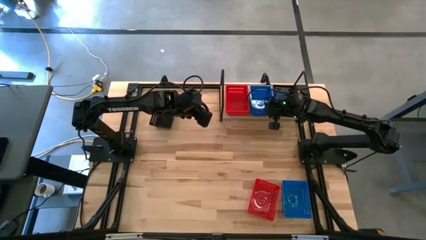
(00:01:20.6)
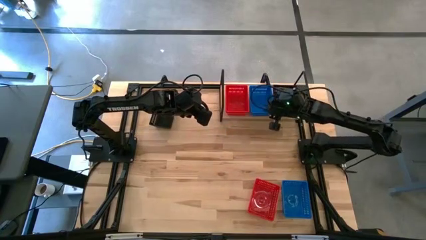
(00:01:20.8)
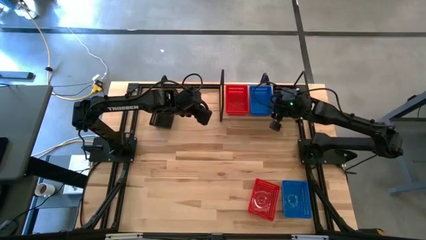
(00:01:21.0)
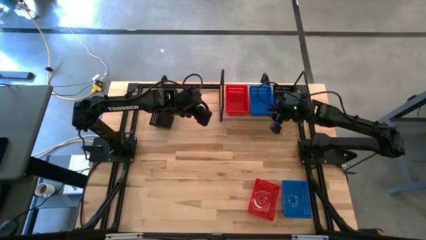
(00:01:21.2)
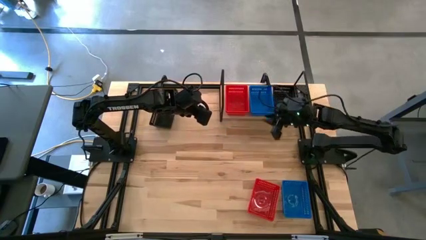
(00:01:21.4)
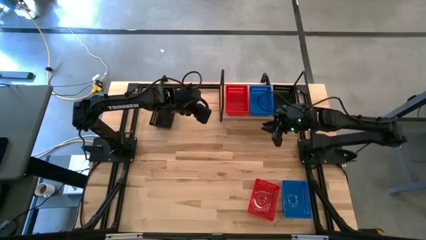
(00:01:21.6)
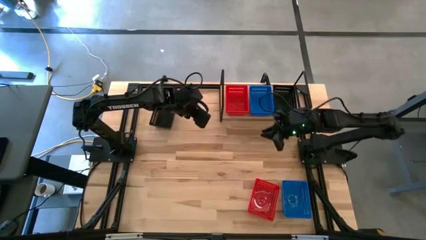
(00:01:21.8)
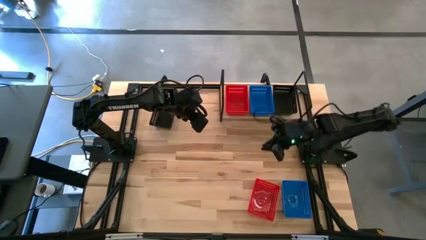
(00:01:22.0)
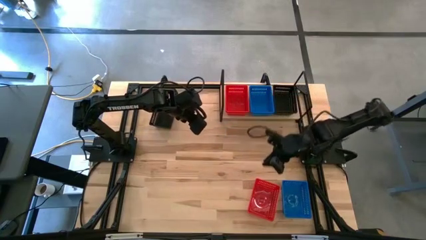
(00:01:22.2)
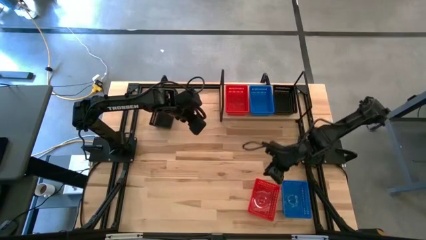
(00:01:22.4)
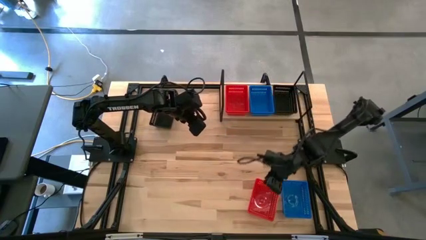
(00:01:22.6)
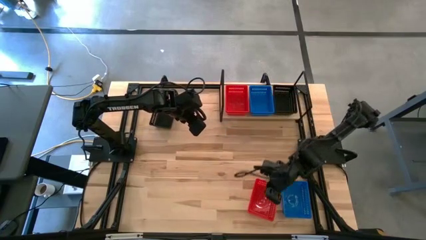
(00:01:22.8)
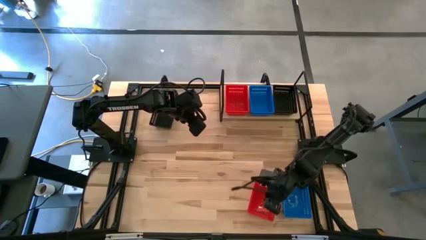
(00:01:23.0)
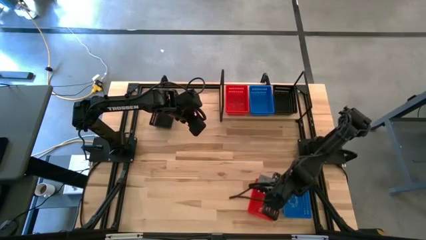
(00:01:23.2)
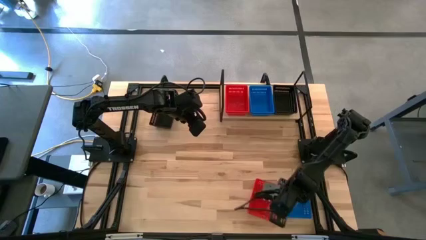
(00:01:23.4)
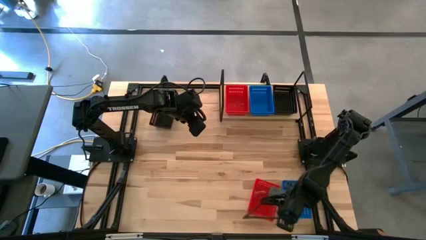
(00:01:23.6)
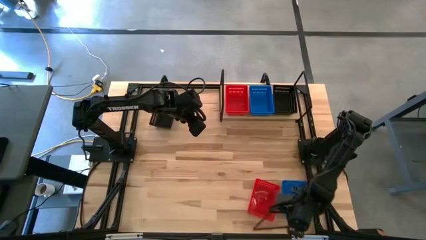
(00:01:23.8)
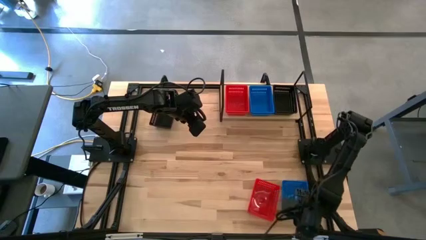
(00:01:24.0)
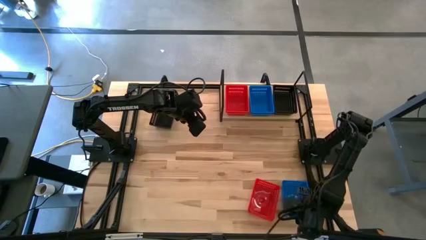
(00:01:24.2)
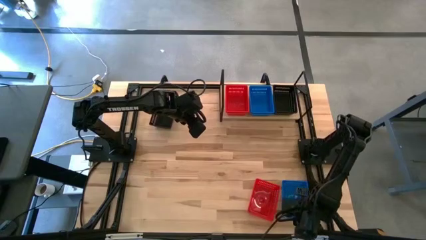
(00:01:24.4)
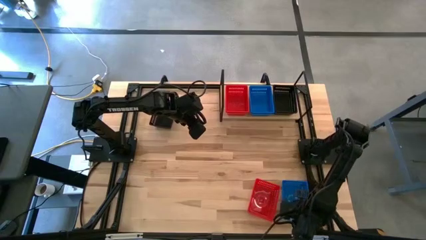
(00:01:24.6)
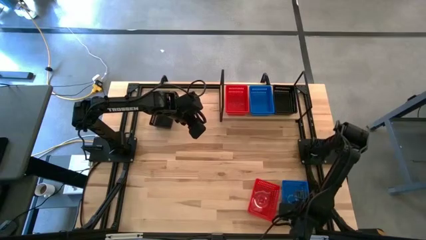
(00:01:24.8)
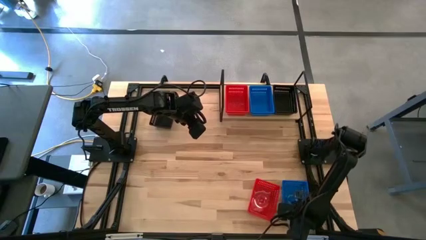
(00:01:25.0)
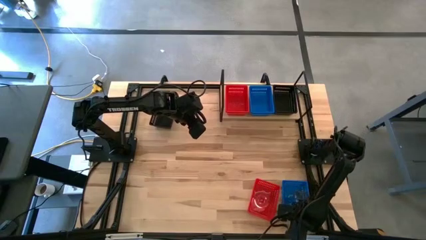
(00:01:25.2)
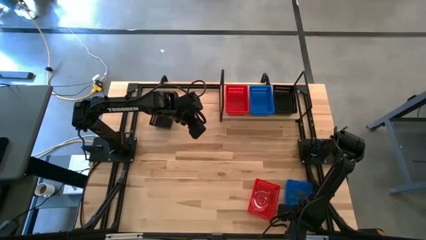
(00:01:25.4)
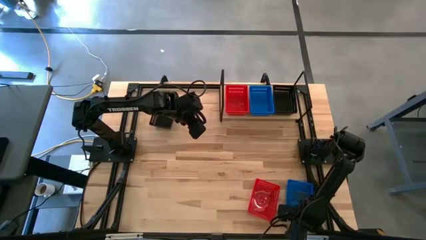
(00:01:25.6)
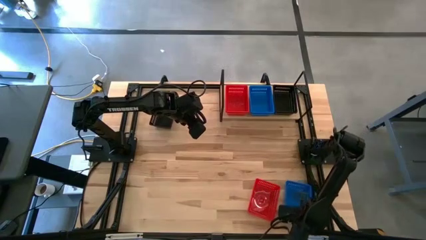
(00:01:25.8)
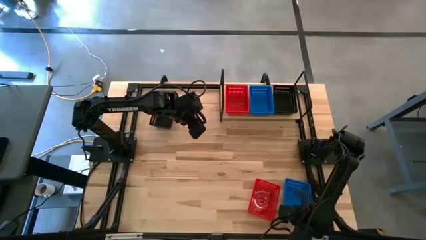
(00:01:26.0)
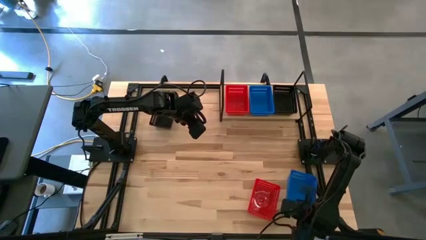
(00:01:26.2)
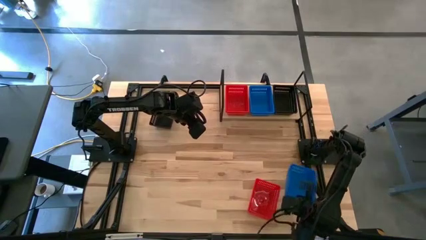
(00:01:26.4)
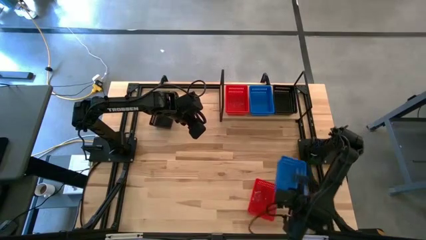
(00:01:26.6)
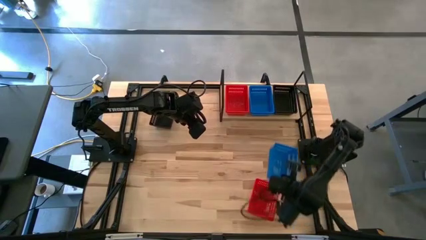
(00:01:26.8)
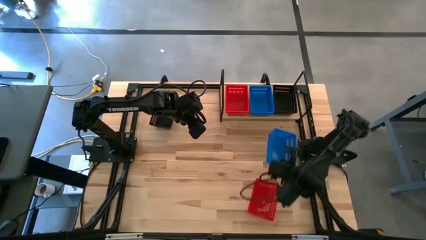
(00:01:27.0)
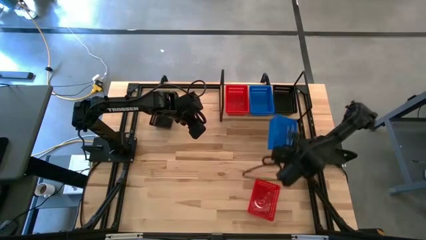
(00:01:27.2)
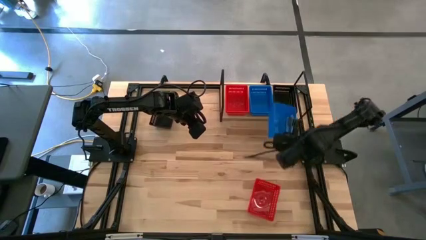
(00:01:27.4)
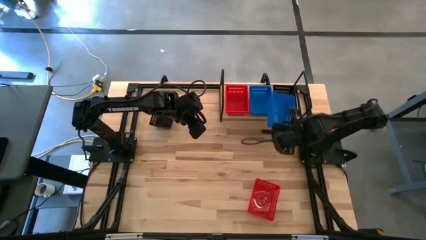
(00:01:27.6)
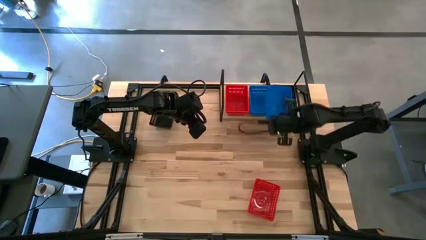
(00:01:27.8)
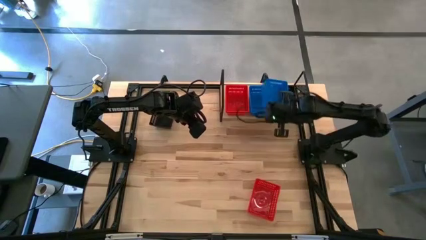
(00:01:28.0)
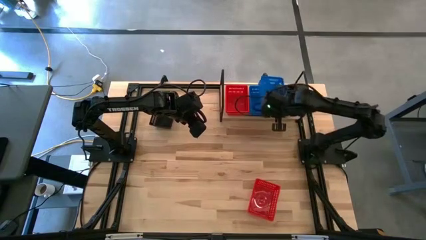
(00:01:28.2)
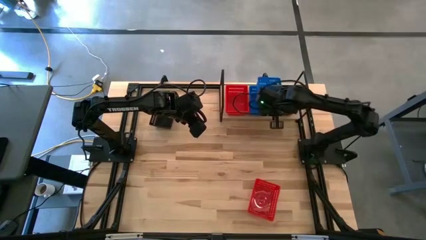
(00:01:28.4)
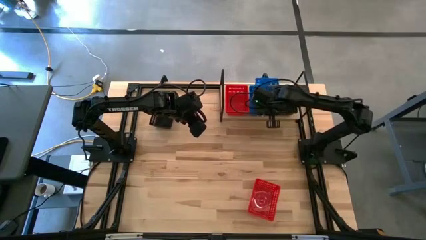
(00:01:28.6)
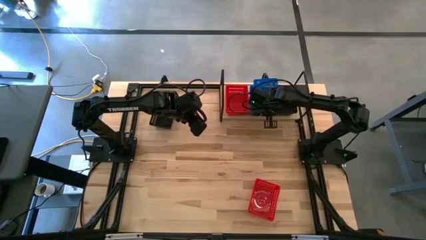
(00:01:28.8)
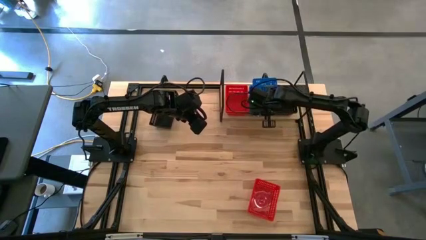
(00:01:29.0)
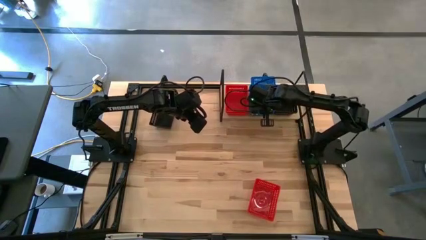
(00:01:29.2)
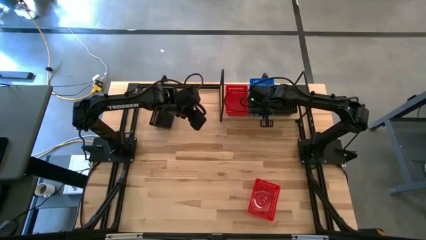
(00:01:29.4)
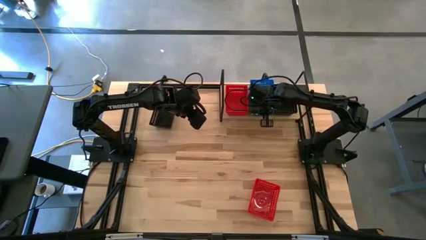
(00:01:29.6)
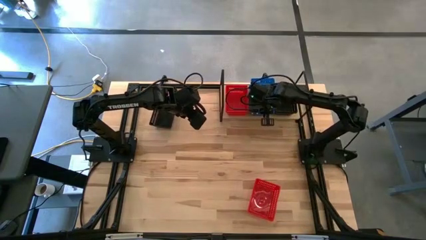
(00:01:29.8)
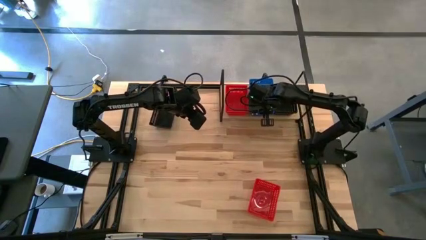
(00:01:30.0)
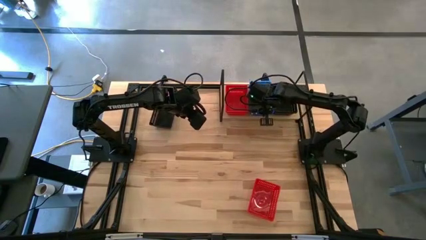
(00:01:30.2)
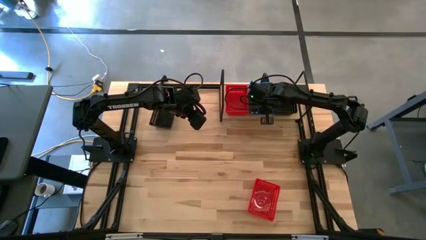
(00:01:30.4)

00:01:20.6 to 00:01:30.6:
Task: Stack baskets on shelf by color
Stack the blue bin on top of the blue bins on the shelf
